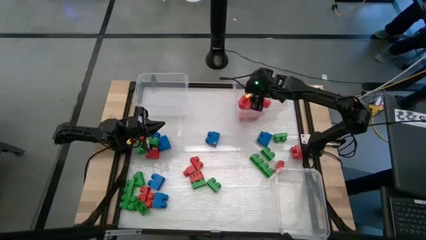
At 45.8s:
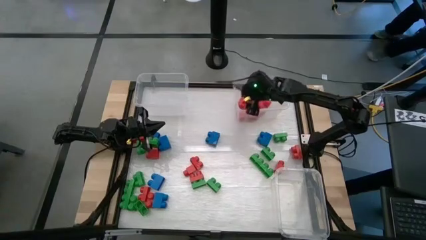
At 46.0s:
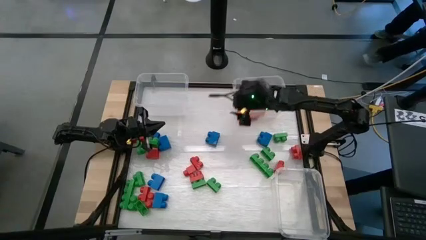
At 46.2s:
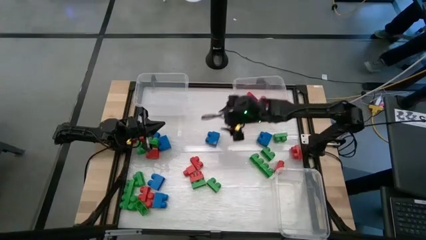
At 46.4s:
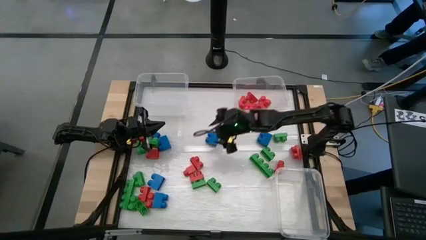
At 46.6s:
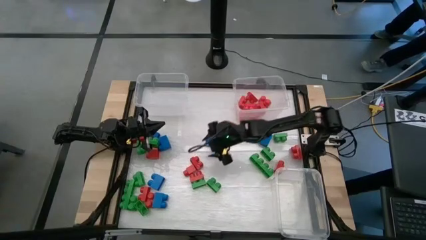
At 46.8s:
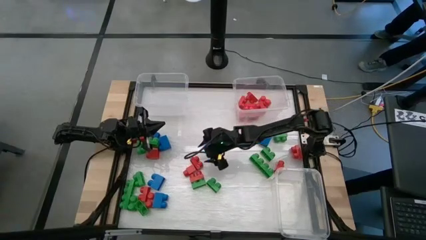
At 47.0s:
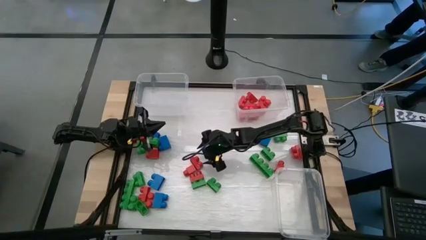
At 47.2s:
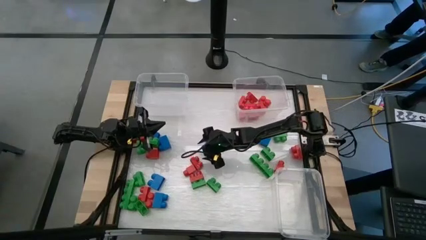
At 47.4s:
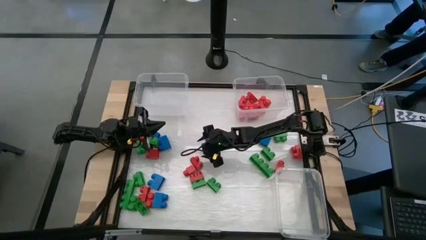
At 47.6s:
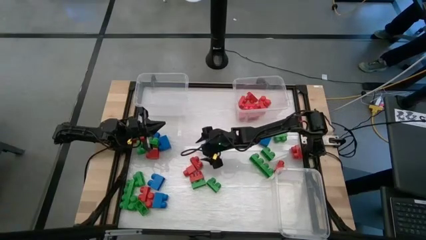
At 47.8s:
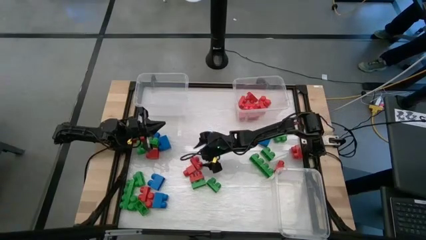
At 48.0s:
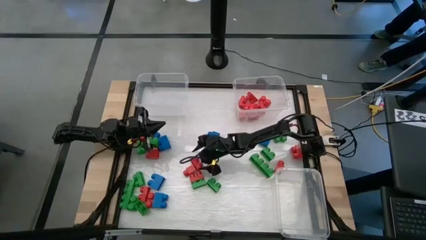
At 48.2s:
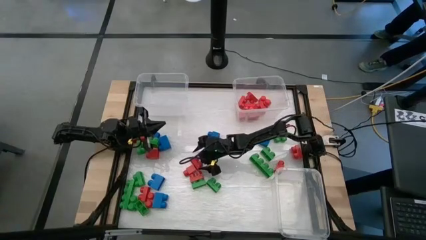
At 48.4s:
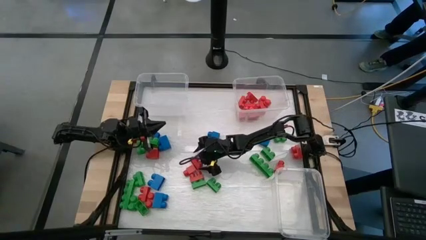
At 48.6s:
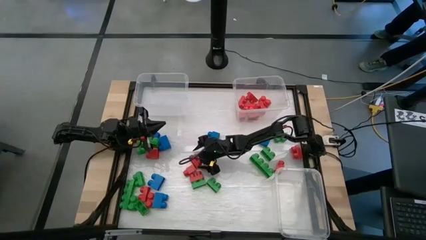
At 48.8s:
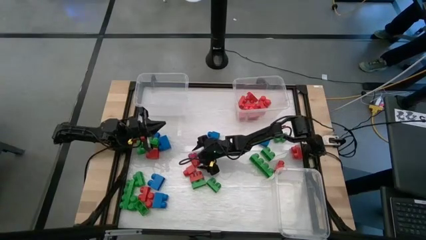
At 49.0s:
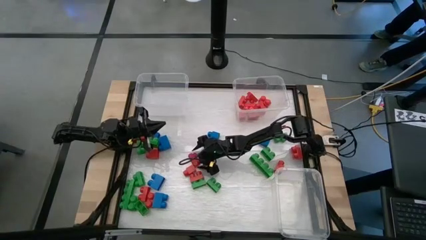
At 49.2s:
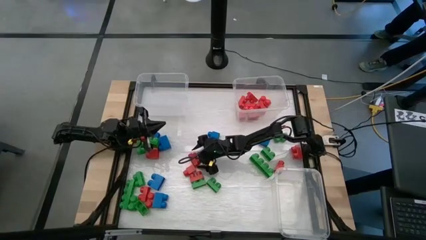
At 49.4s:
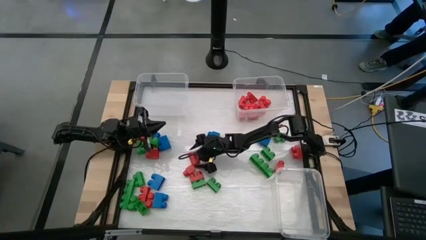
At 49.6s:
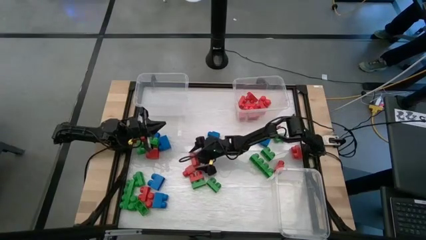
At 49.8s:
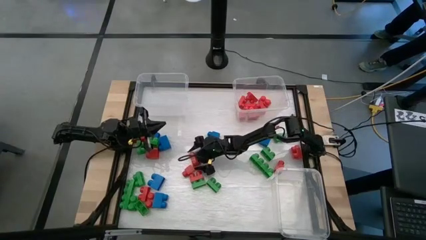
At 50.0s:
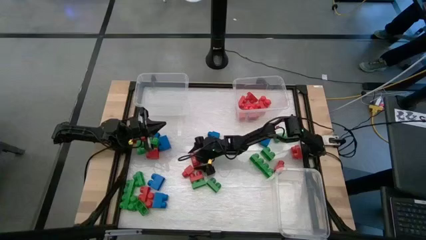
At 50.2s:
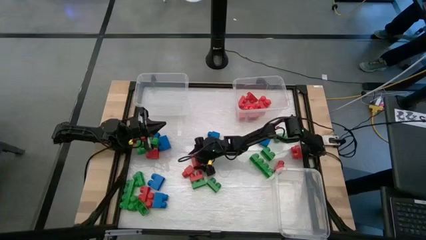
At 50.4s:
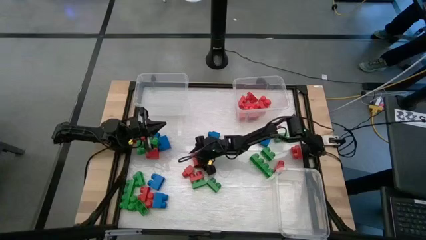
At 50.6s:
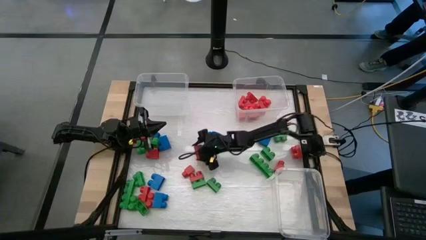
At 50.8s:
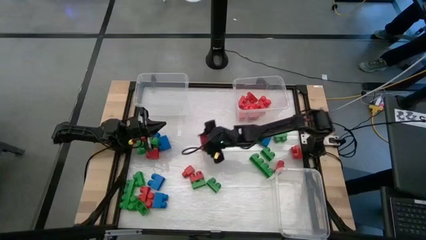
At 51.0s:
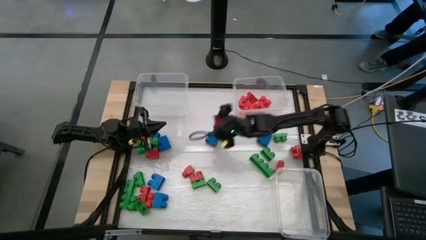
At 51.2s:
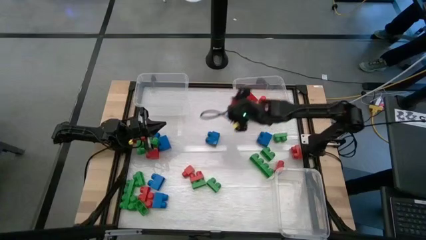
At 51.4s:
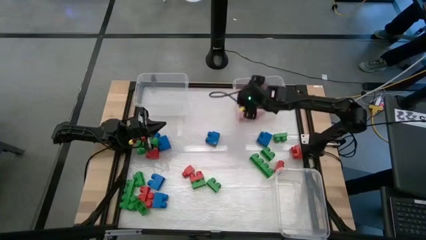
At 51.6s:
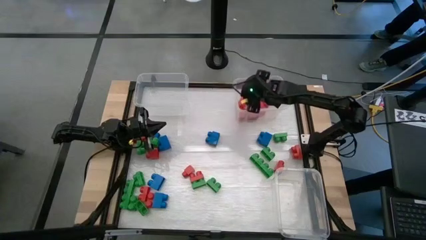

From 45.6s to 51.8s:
Task: Sort blocks
Put the red game piece into the top right transparent bin

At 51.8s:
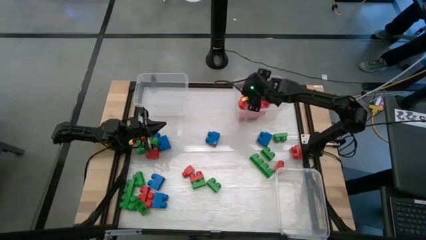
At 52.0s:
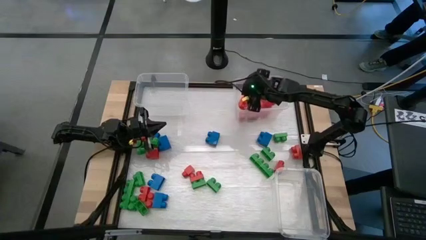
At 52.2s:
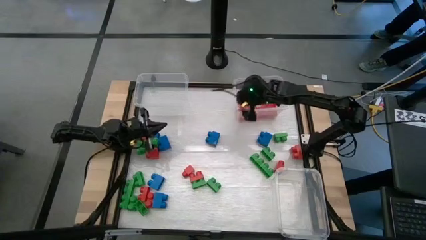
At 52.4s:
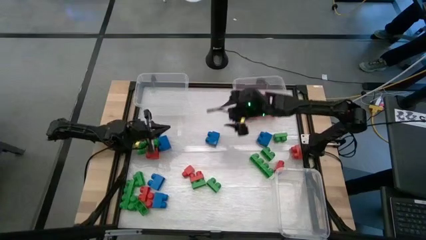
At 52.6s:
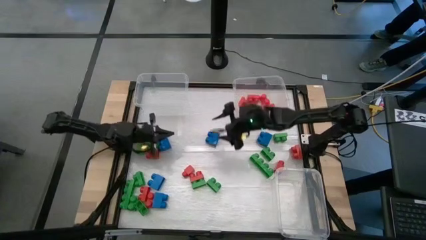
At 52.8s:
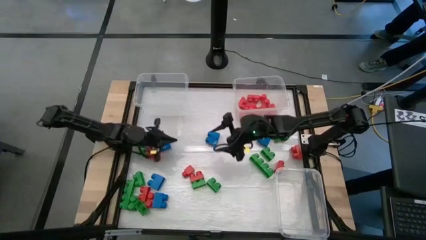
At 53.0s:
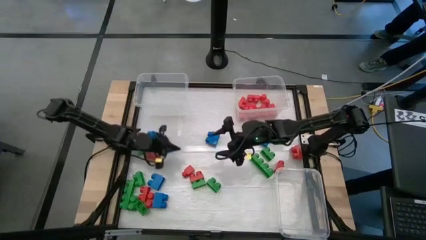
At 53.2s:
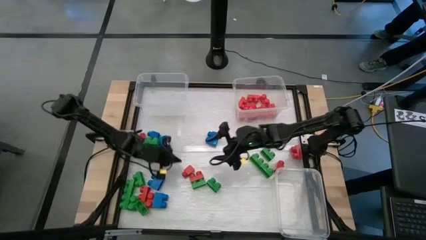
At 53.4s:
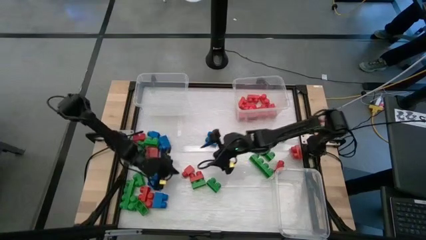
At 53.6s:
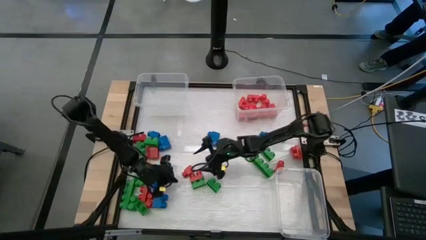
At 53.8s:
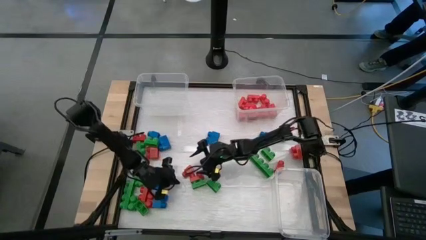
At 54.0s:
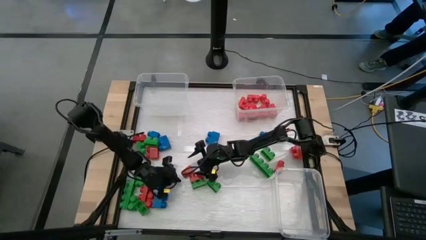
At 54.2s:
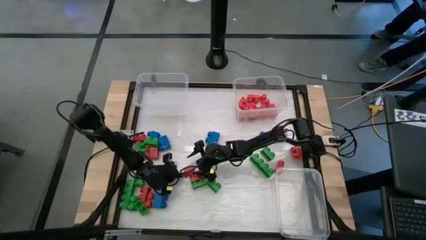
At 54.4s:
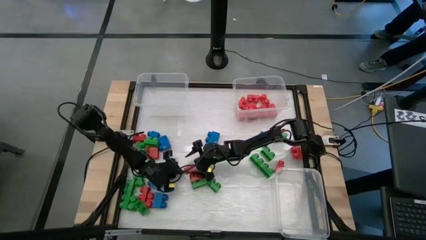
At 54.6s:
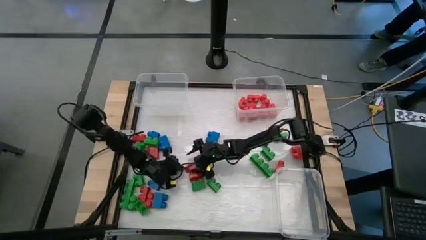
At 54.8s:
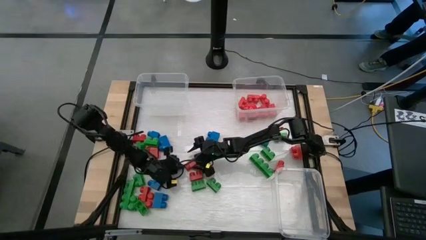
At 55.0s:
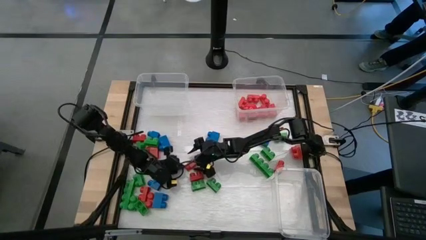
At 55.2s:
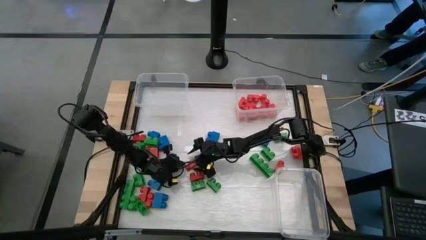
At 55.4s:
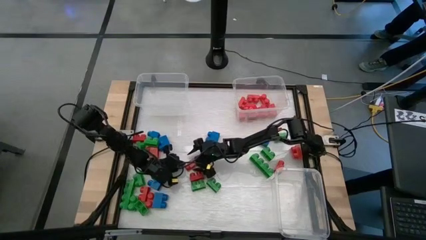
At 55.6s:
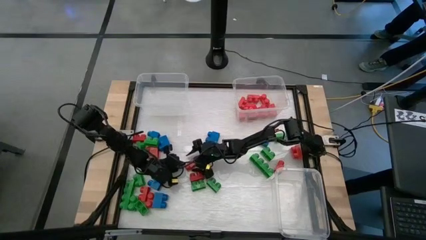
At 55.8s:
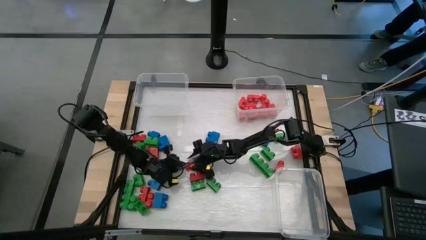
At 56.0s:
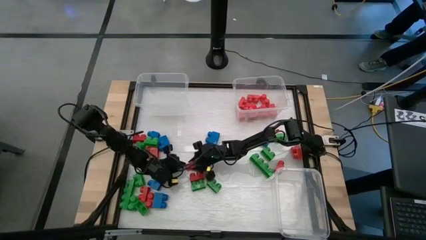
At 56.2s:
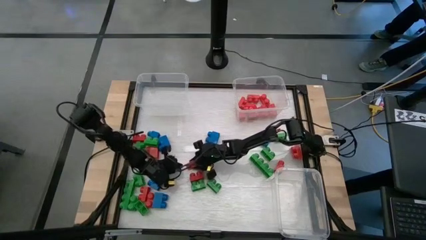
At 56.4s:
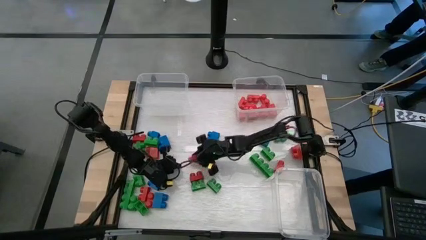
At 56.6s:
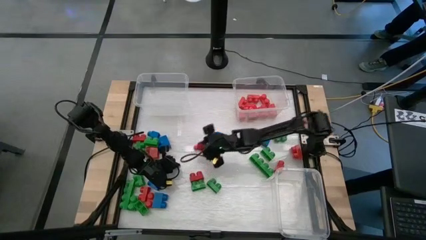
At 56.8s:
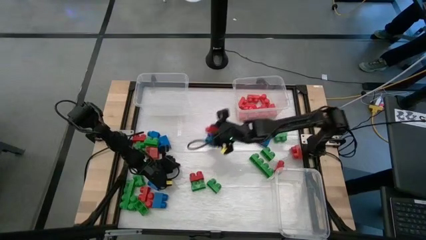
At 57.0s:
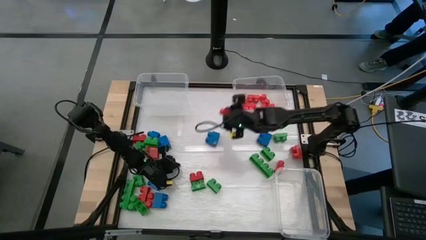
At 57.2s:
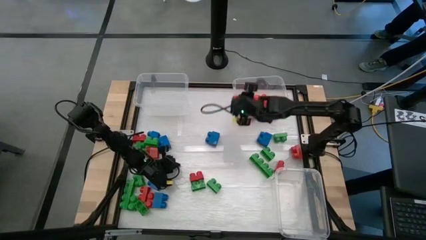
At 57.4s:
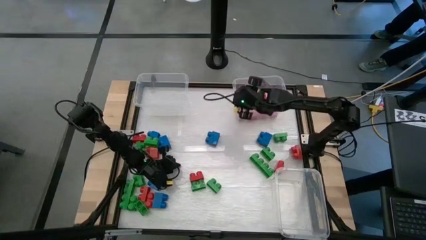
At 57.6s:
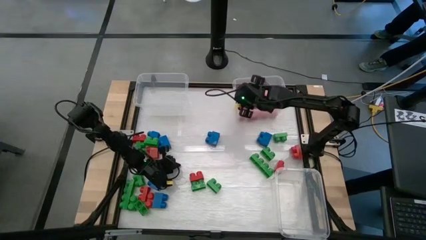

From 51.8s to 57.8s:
Put the red game piece into the top right transparent bin

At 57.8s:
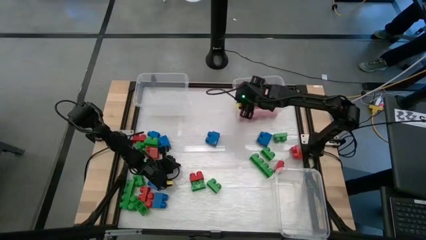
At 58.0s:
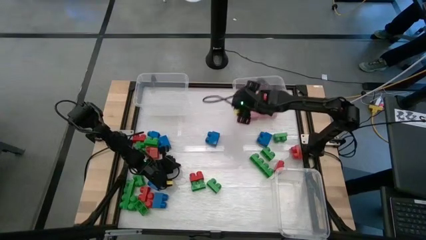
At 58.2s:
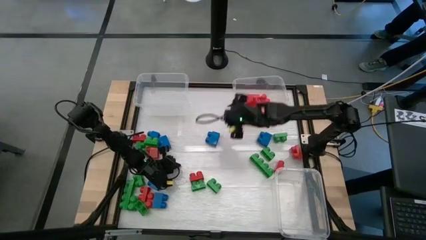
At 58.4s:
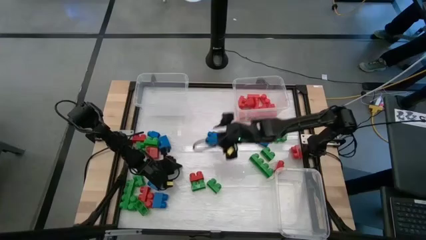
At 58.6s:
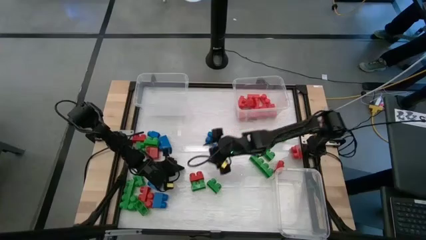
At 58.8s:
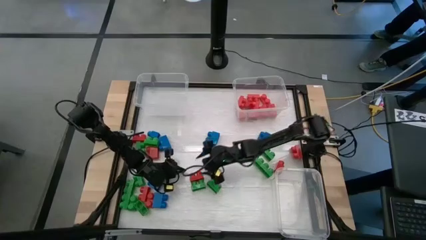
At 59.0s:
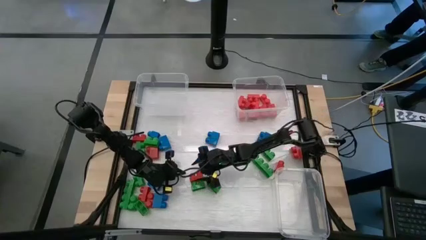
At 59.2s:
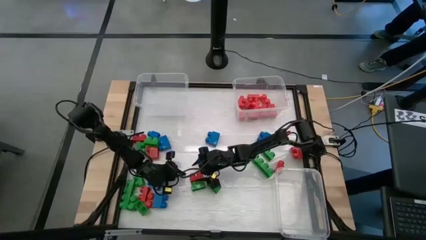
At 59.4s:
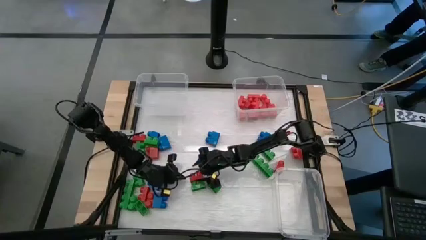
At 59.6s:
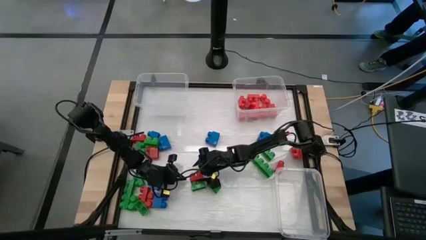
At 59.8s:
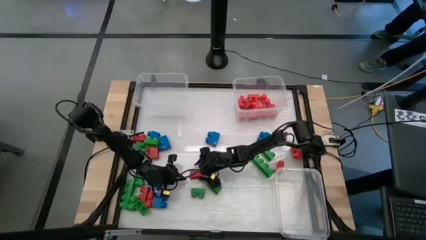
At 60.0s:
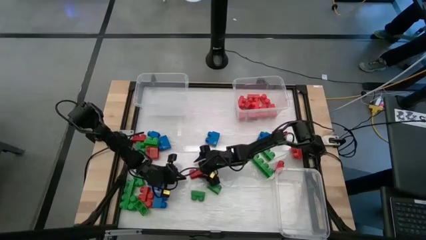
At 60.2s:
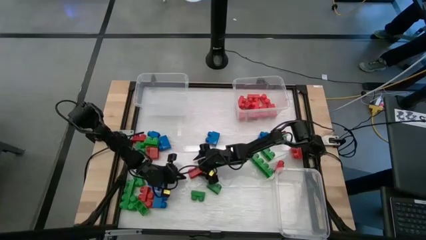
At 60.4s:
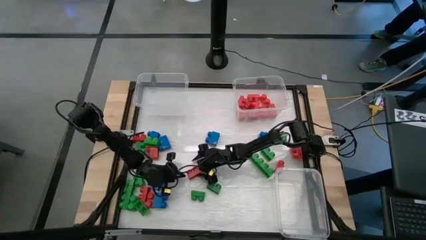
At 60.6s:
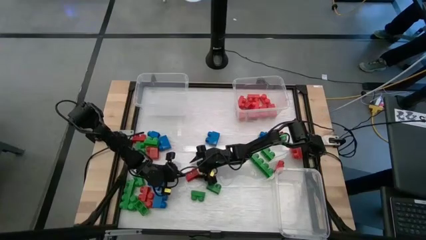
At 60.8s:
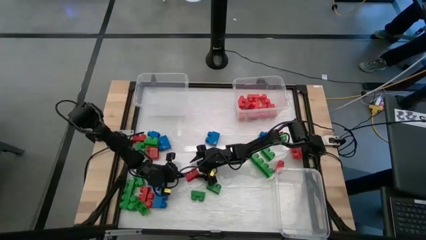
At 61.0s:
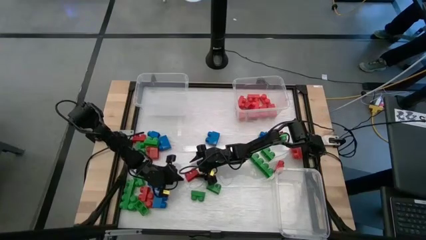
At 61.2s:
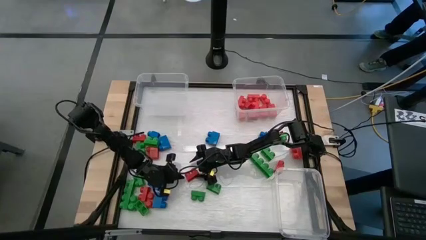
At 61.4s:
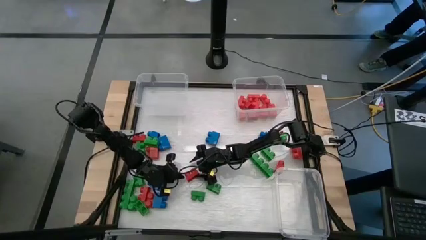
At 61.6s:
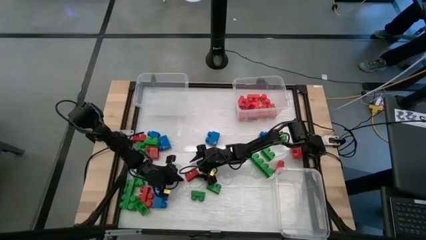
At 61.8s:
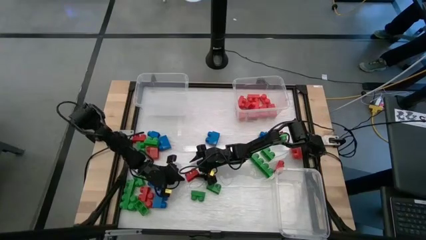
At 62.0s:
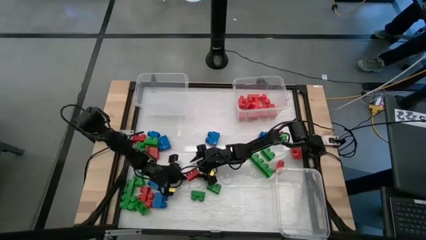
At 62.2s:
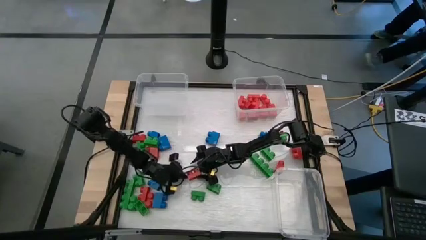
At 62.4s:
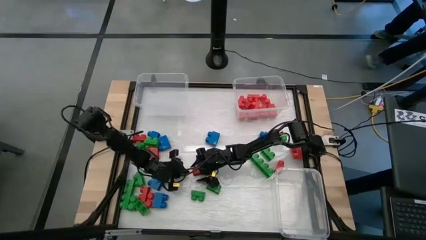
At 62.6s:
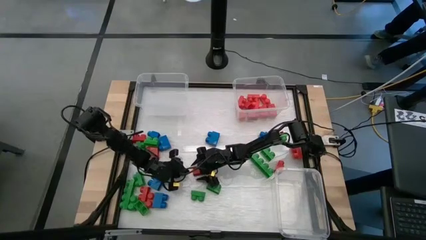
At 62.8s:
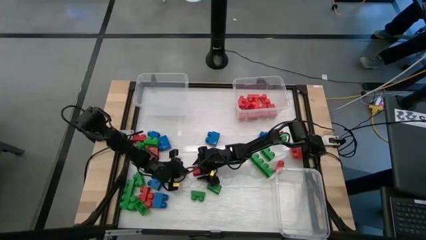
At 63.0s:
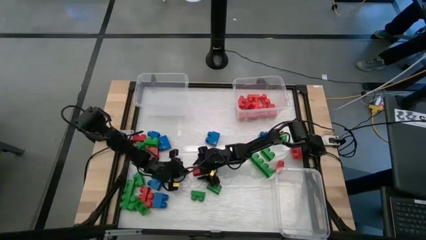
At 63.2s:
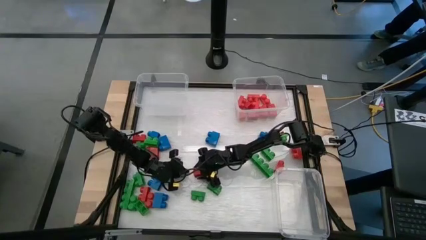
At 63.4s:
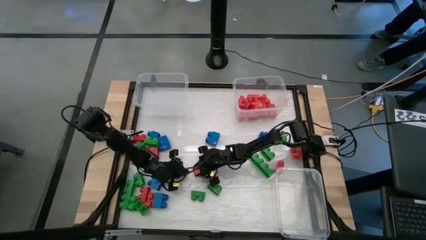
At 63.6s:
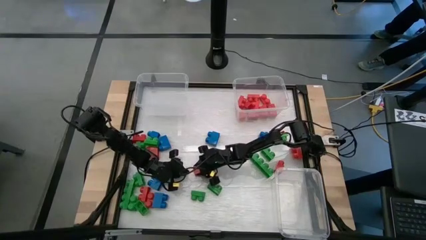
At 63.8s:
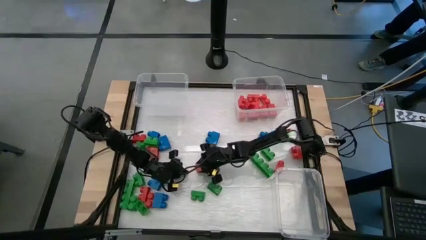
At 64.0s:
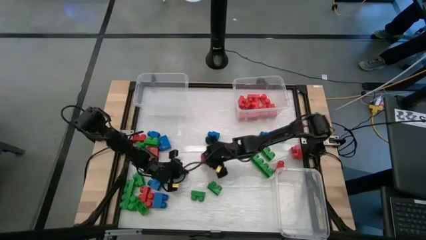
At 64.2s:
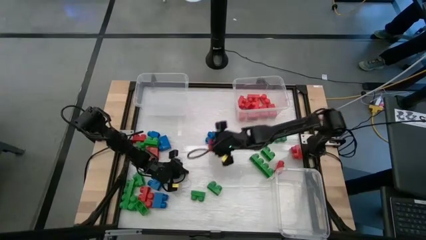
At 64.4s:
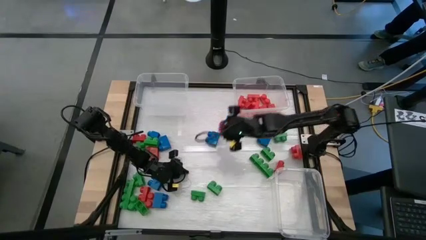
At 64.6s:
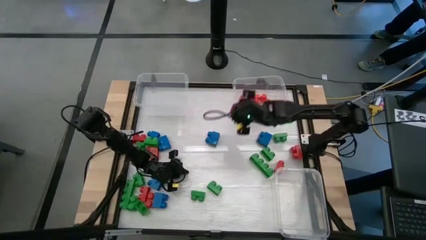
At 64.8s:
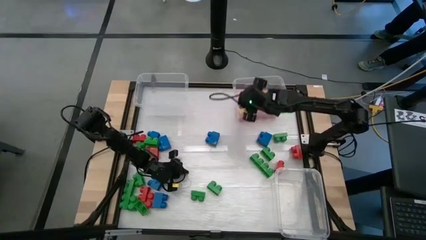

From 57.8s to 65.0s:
Put the red game piece into the top right transparent bin
